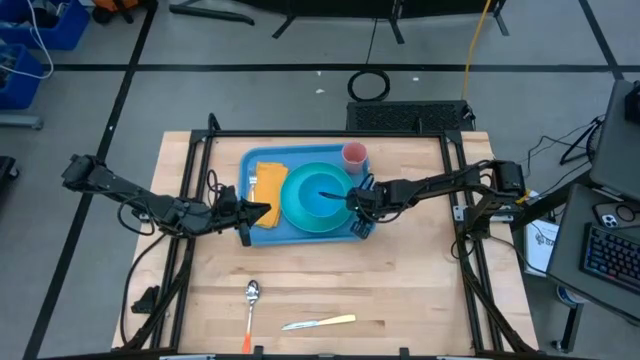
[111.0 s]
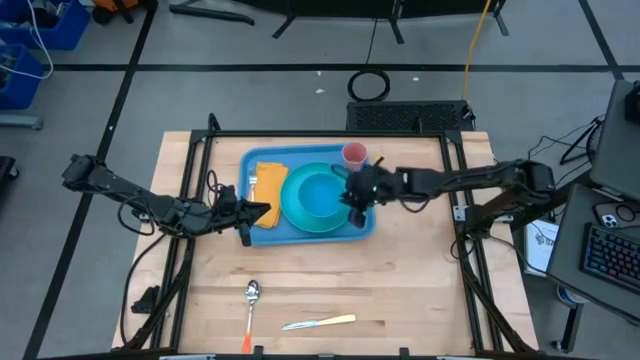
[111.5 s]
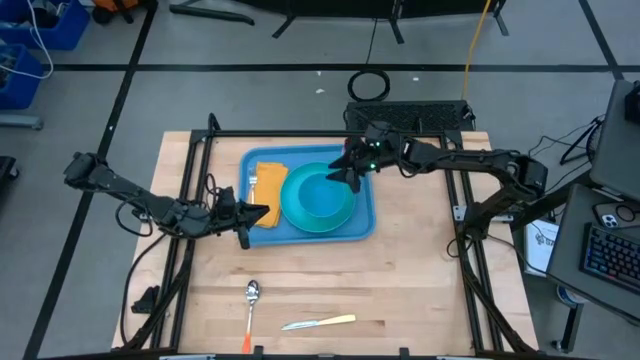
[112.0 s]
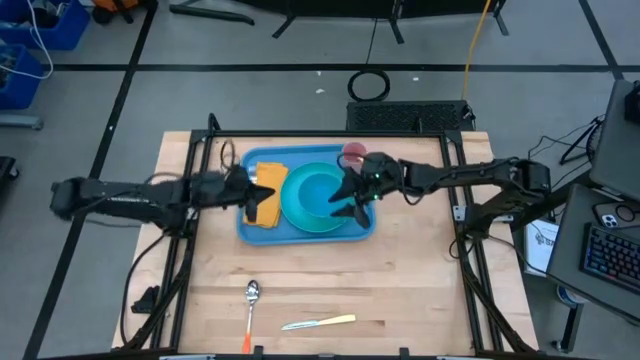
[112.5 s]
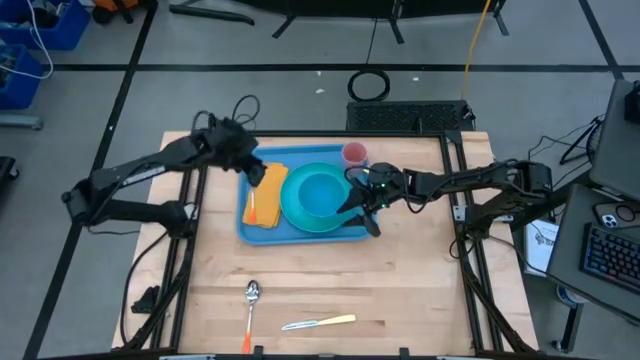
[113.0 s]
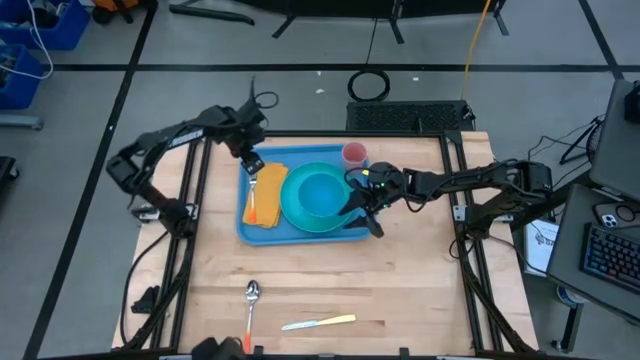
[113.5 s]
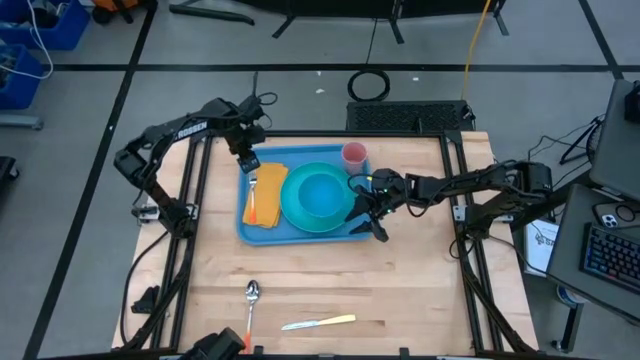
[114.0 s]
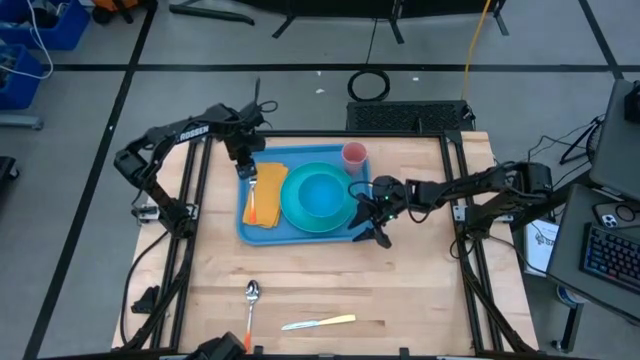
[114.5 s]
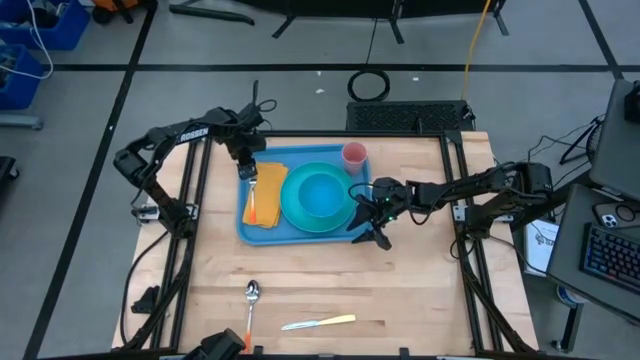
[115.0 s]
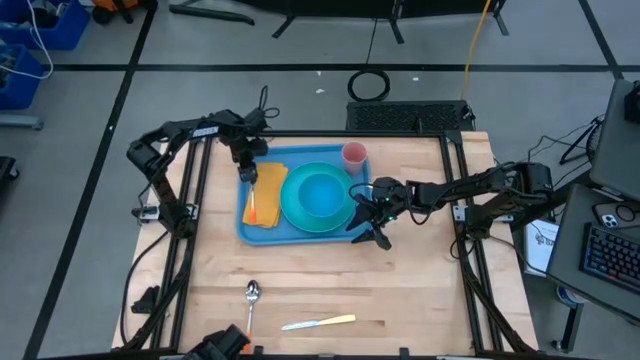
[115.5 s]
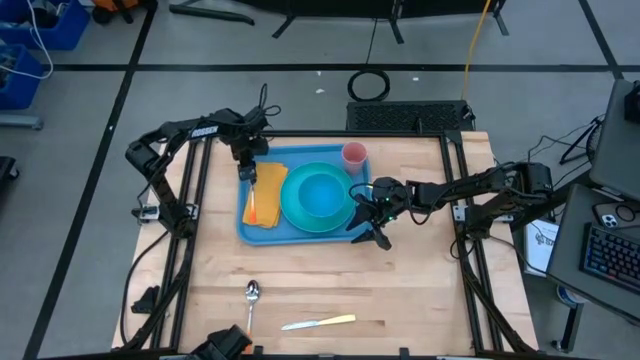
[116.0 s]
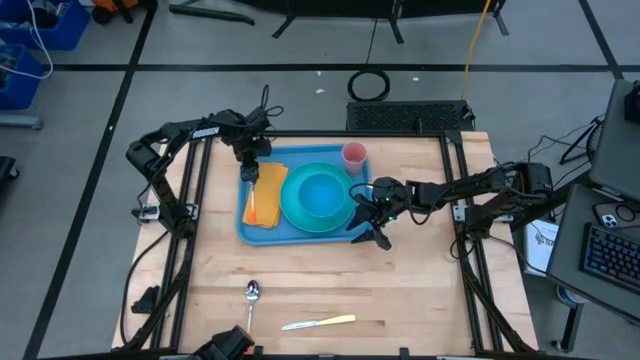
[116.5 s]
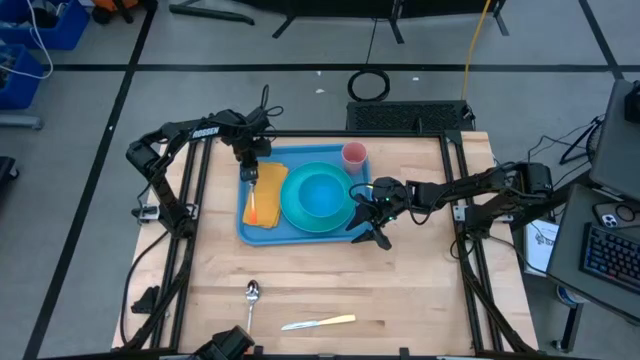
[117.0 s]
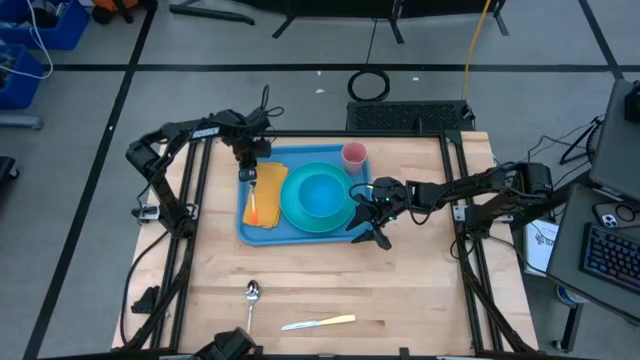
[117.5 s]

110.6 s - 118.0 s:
Task: Set up tray
Adjust the orange fork on the yellow table napkin

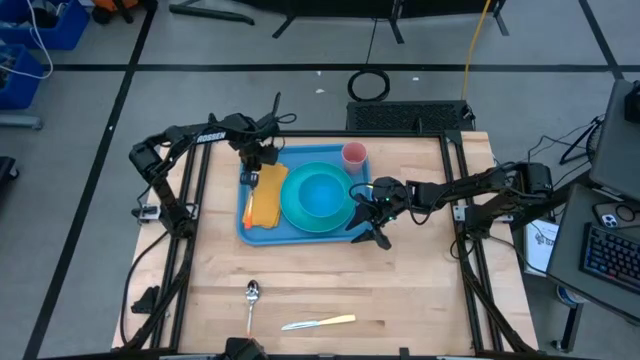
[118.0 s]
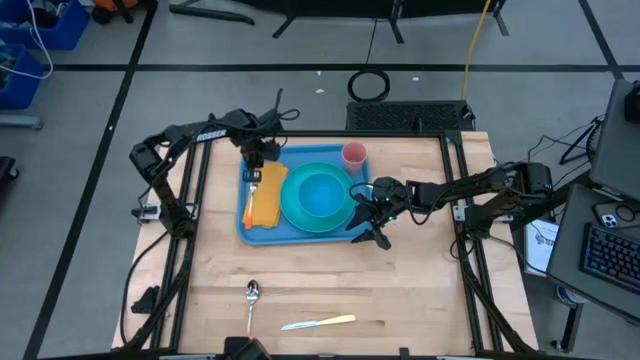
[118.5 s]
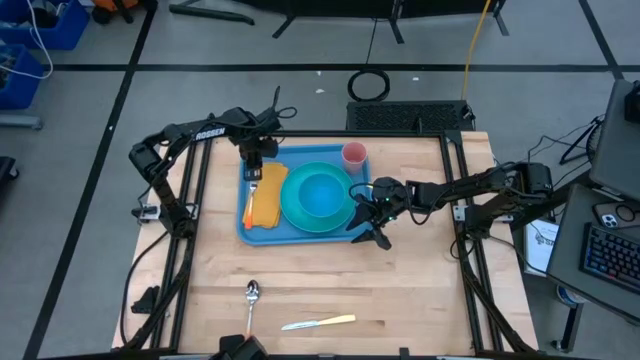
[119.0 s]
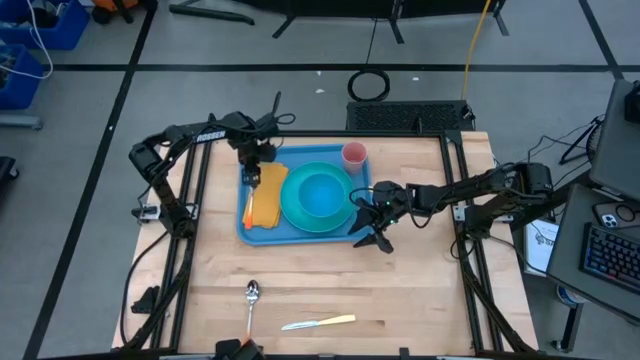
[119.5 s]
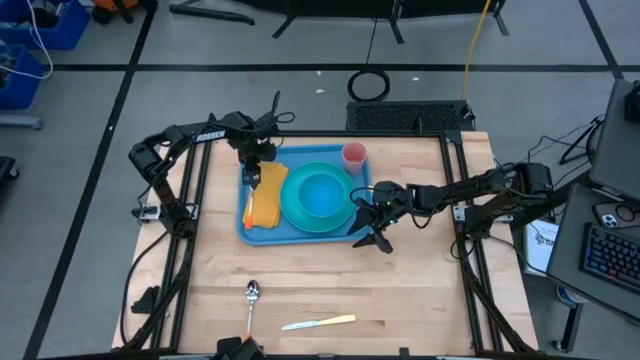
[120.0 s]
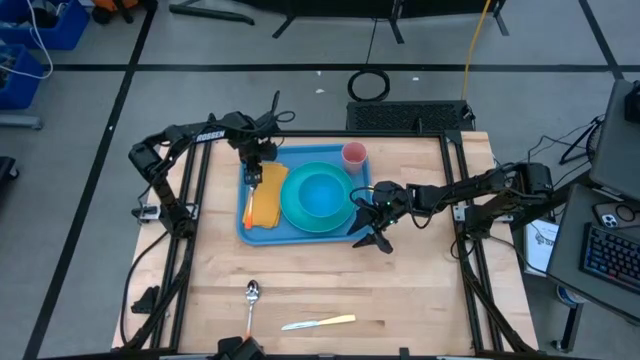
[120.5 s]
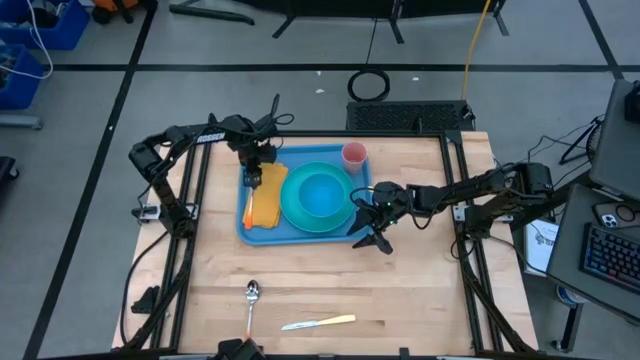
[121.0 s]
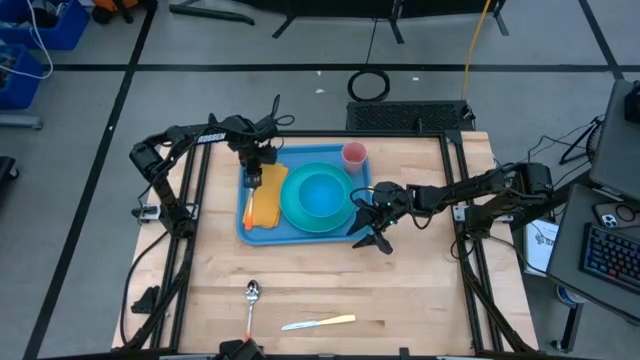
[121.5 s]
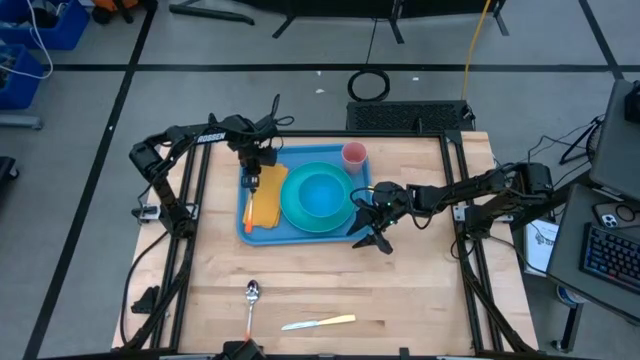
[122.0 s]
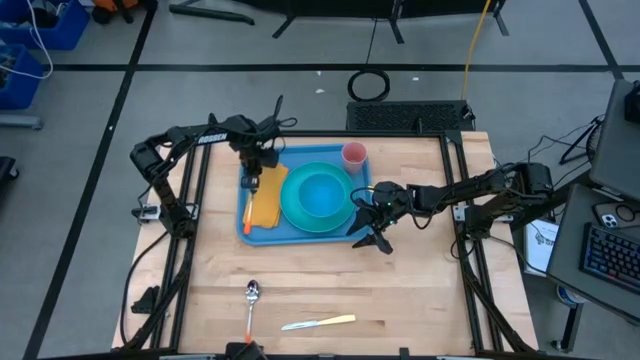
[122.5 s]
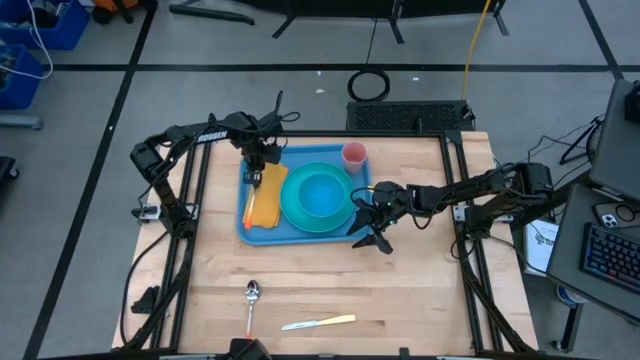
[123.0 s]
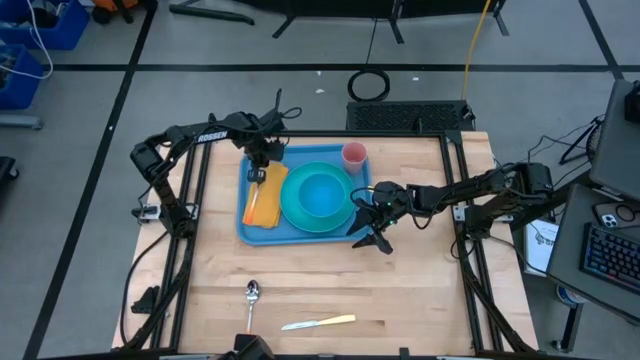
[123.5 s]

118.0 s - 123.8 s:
Adjust the orange fork on the yellow table napkin

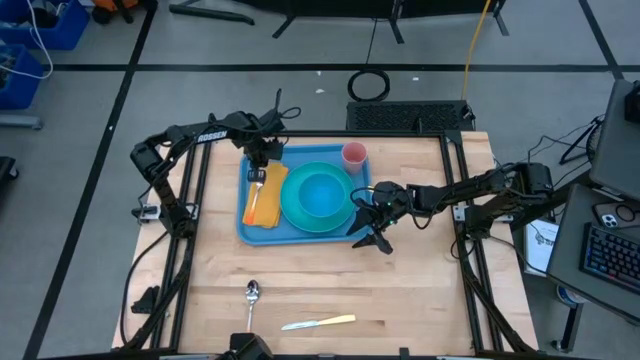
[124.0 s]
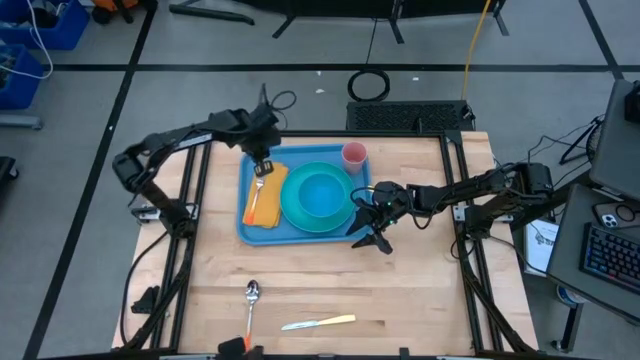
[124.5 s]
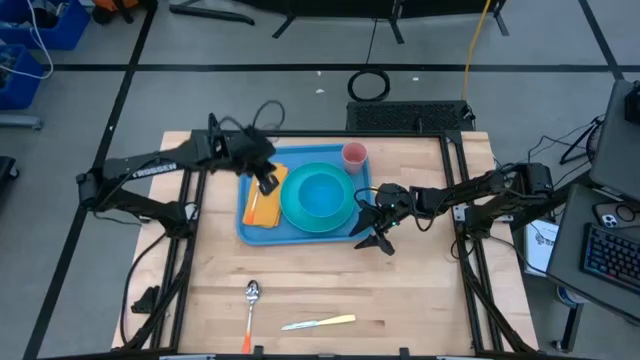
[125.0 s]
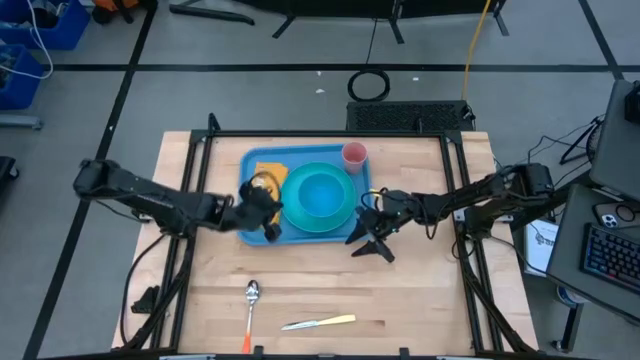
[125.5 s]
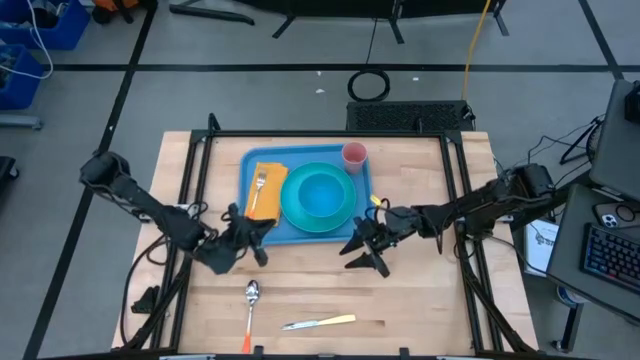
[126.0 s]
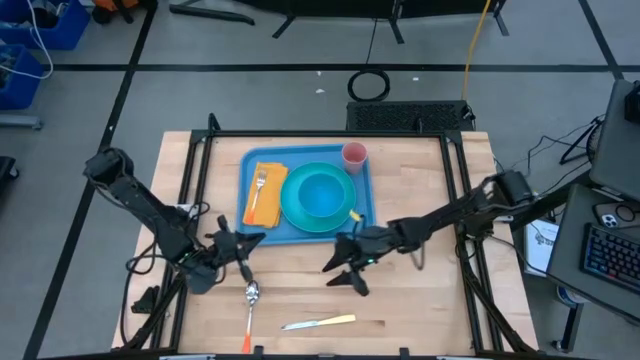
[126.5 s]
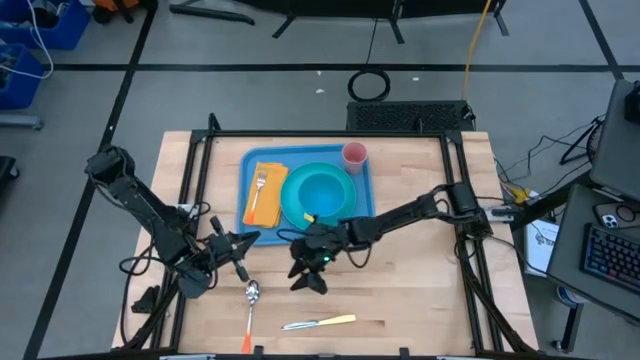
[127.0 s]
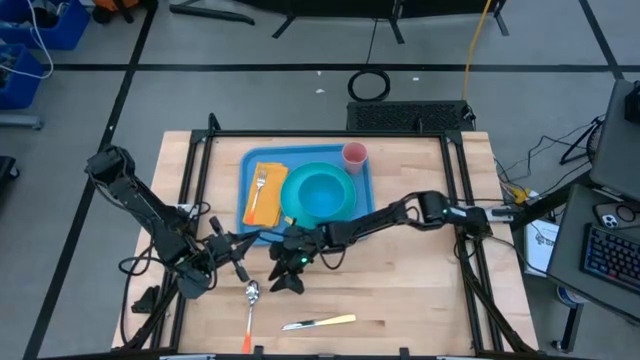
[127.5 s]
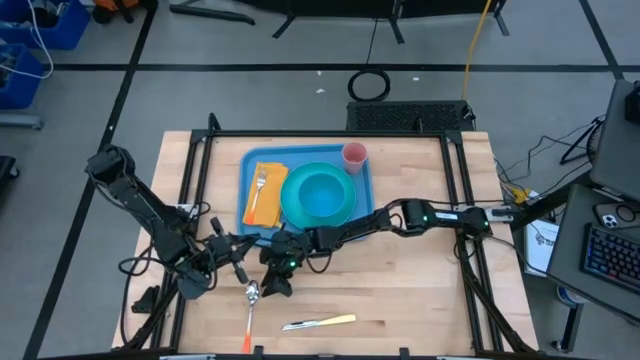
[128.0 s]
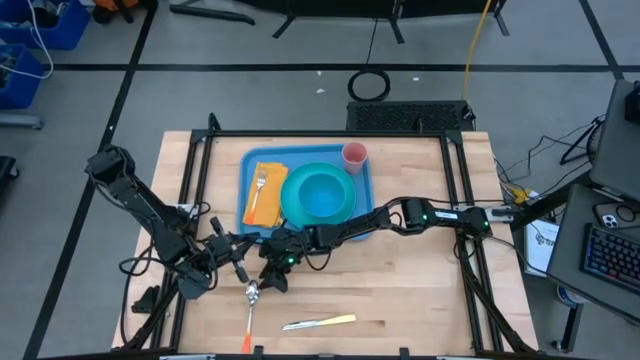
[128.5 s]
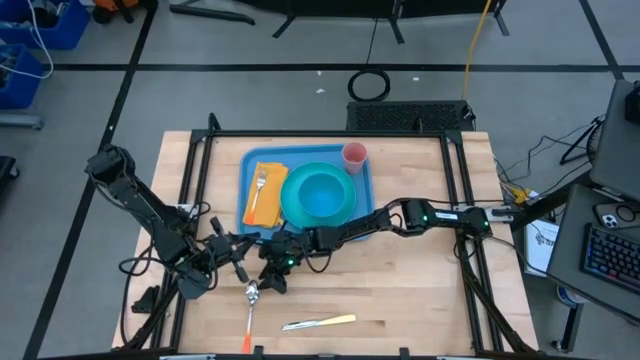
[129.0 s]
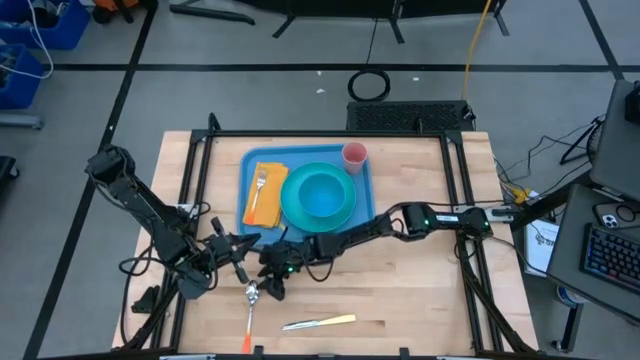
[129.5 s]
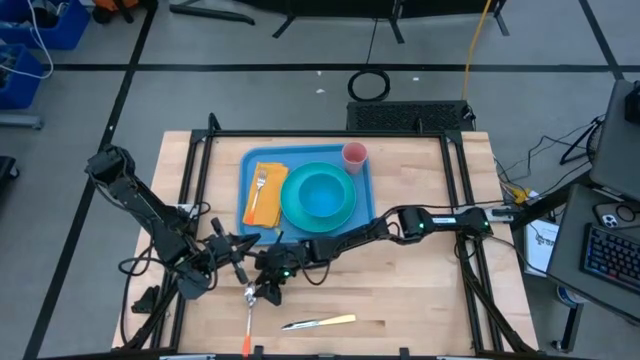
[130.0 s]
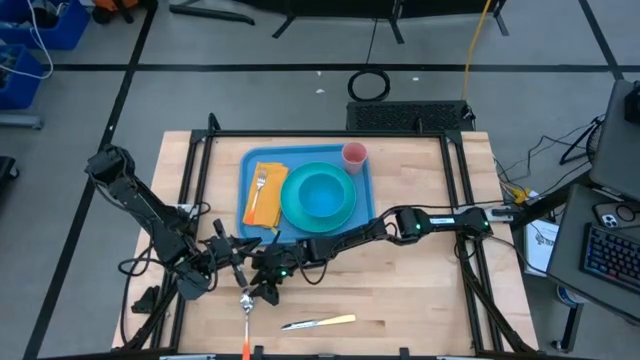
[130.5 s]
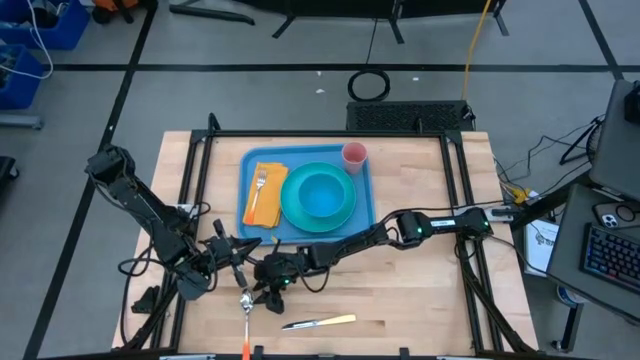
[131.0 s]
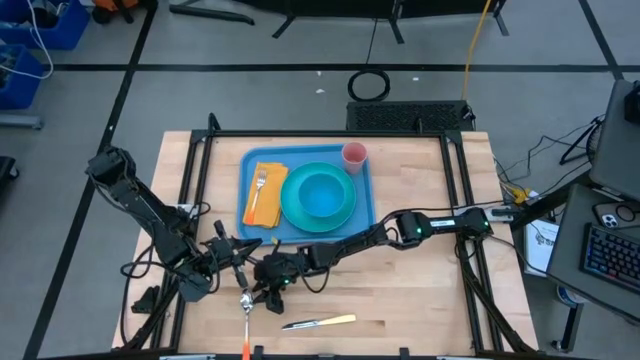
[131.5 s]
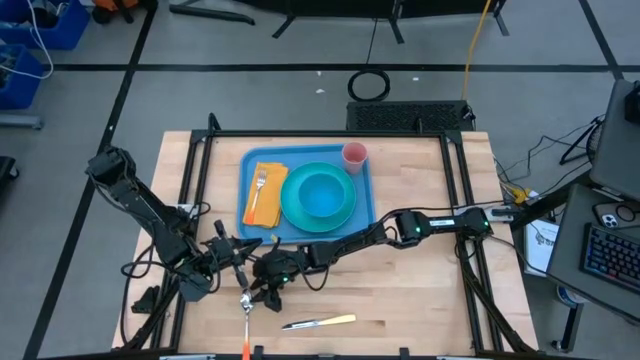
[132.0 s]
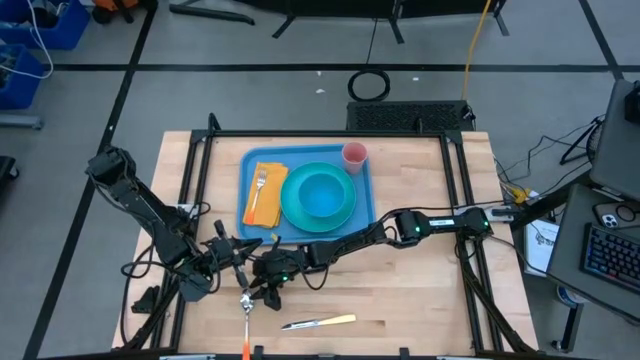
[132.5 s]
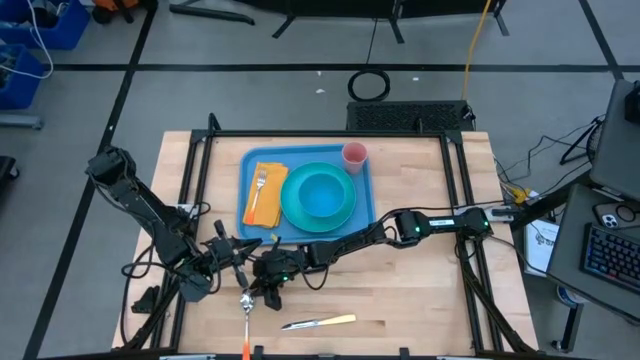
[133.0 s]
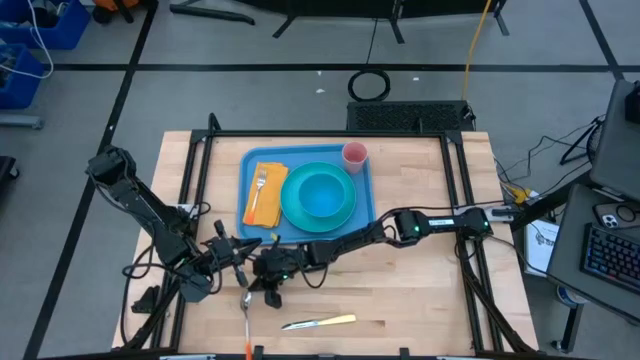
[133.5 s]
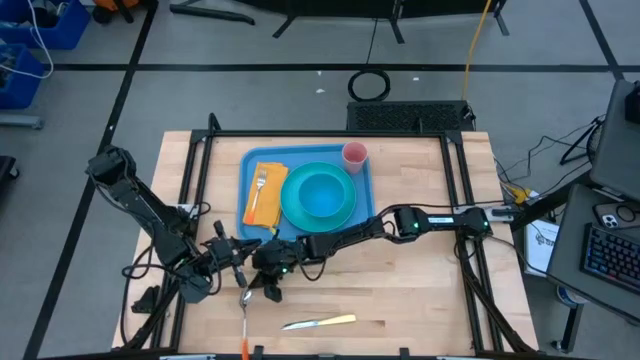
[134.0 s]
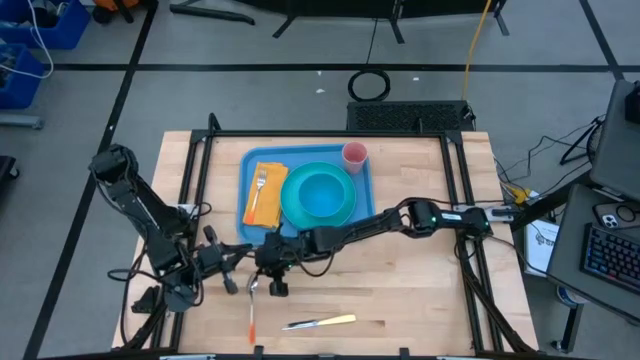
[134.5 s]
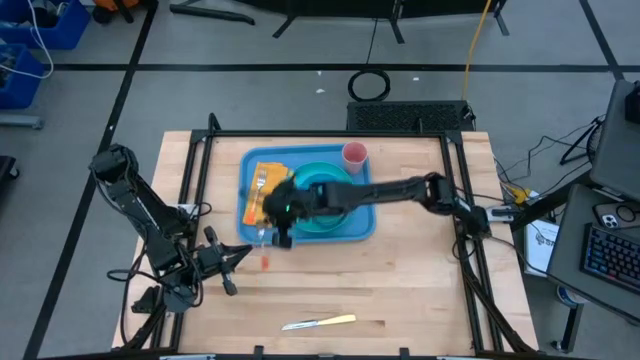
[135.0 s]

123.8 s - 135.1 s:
Put the orange spoon on the yellow napkin to the right of the orange fork on the blue serving tray
